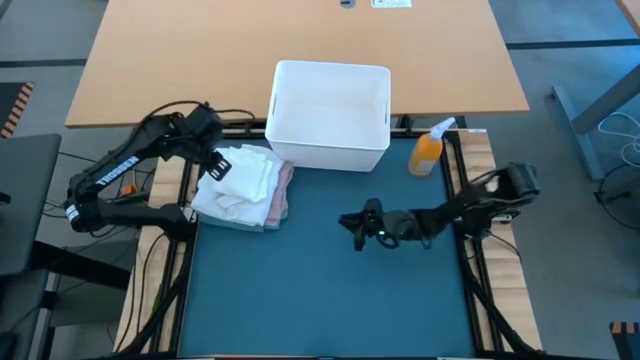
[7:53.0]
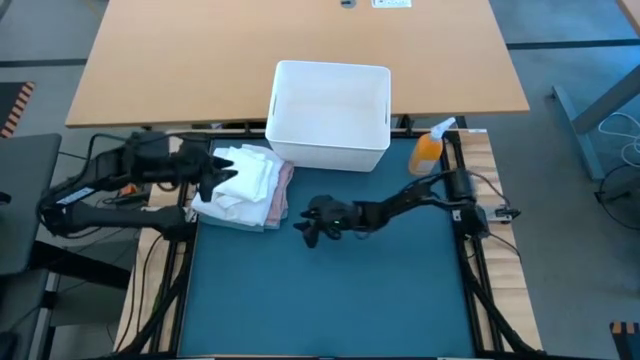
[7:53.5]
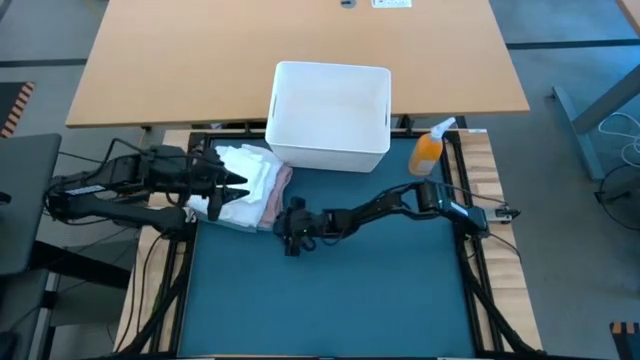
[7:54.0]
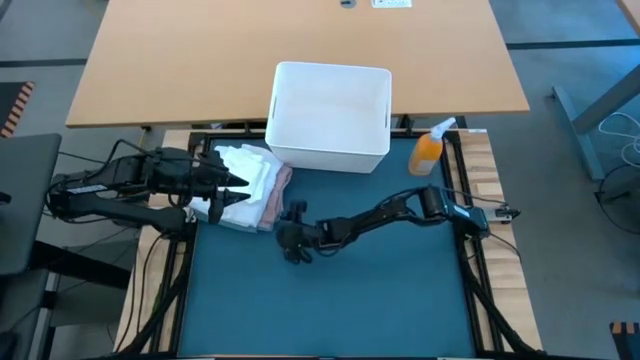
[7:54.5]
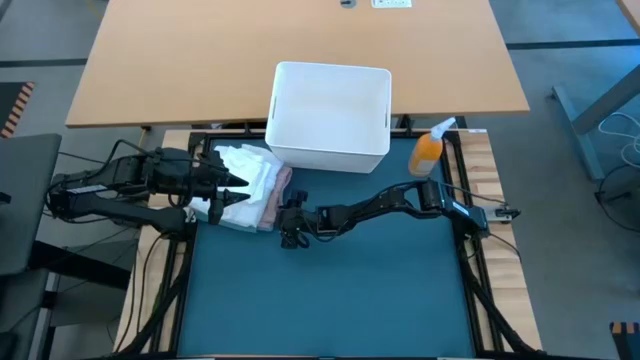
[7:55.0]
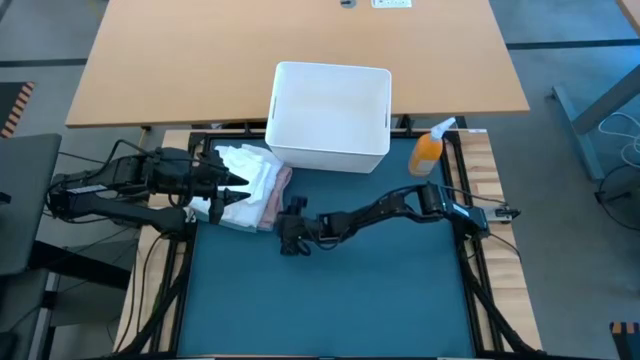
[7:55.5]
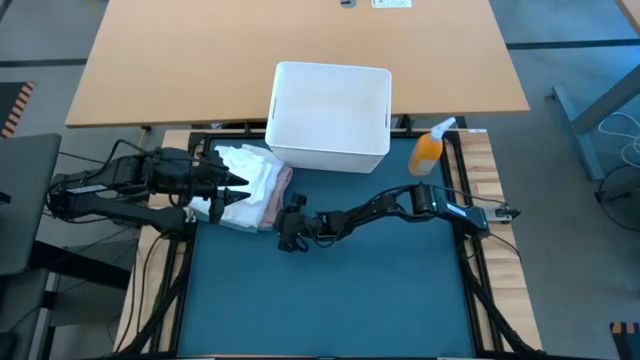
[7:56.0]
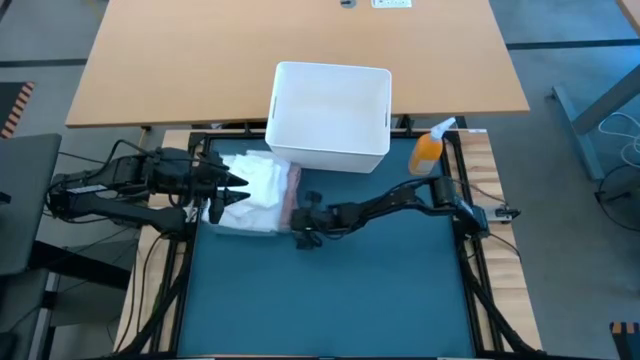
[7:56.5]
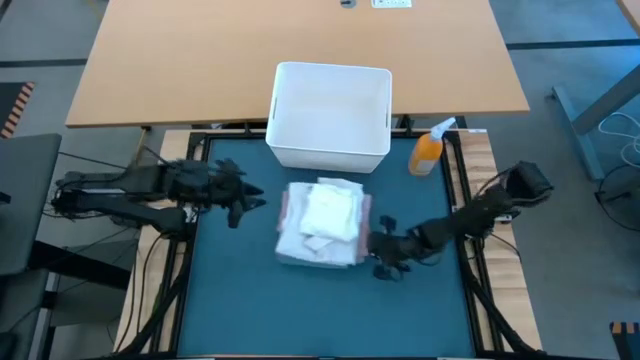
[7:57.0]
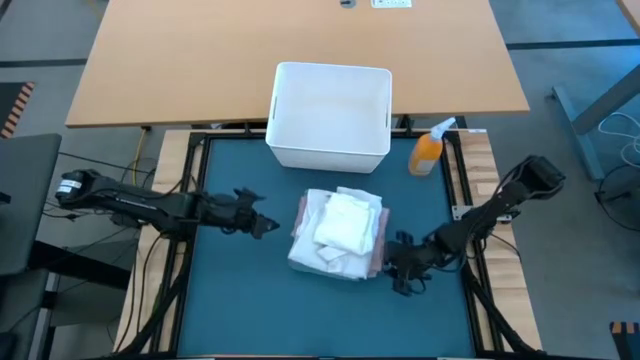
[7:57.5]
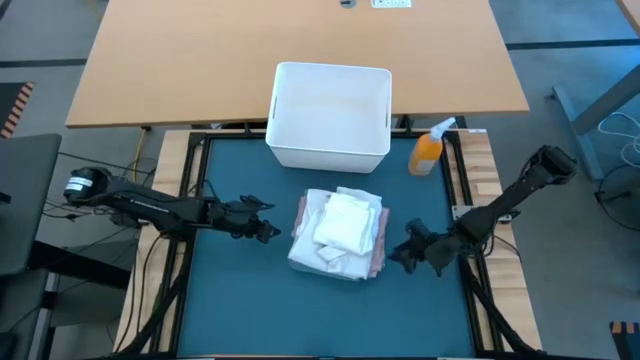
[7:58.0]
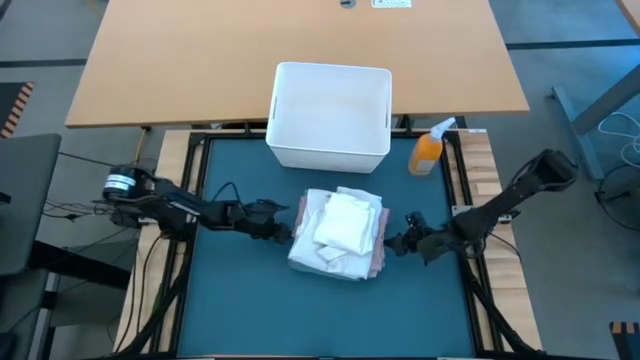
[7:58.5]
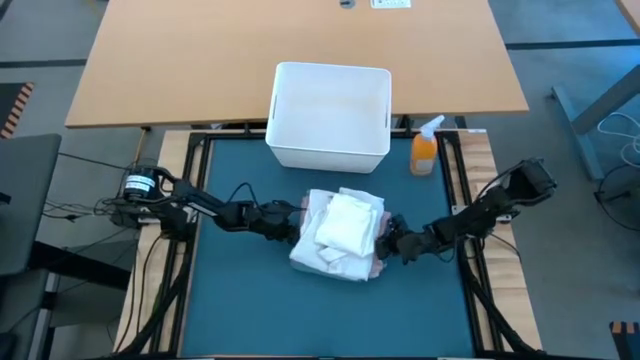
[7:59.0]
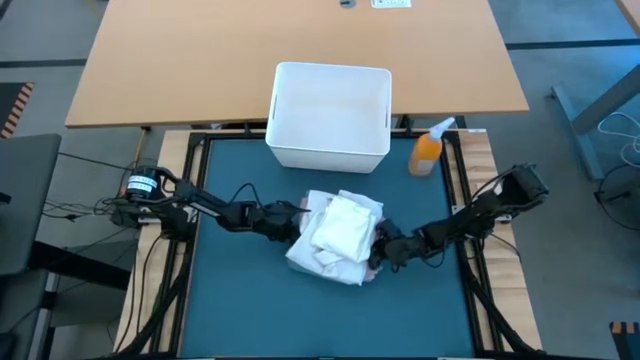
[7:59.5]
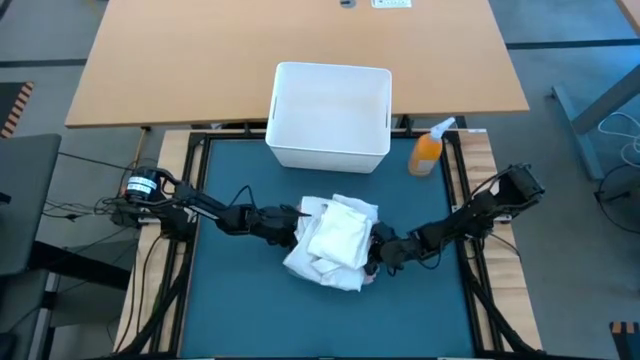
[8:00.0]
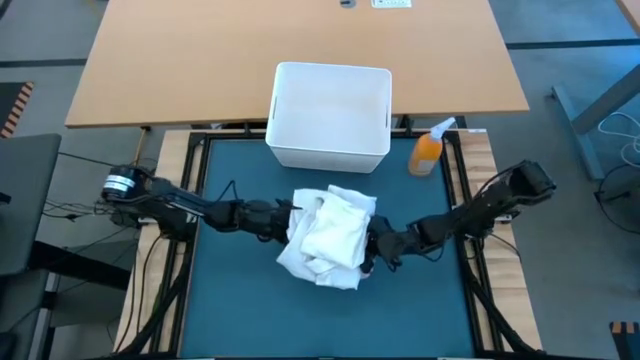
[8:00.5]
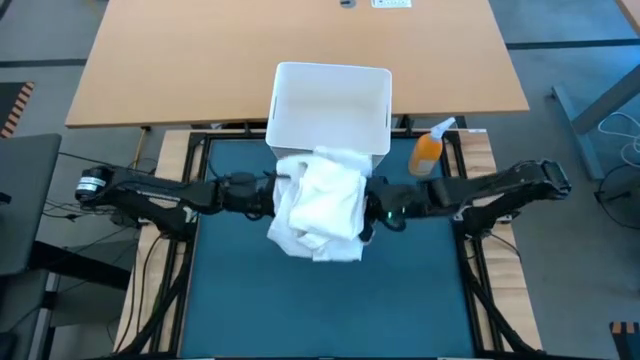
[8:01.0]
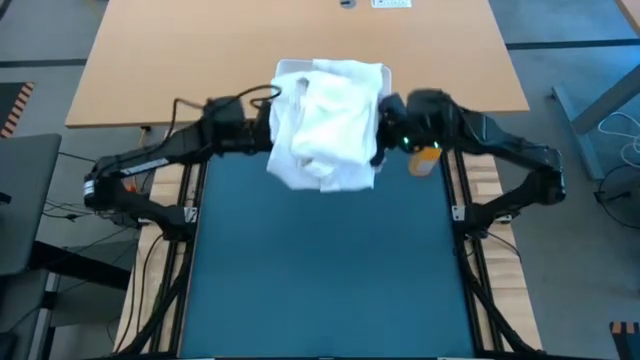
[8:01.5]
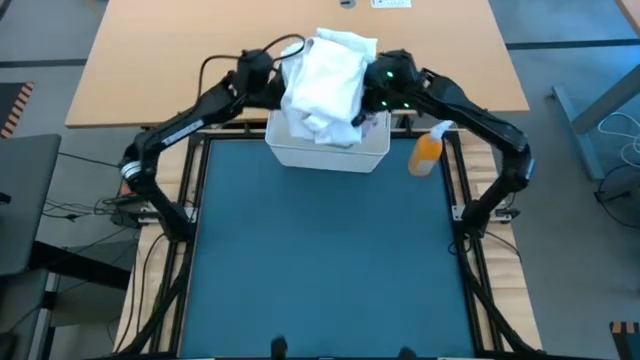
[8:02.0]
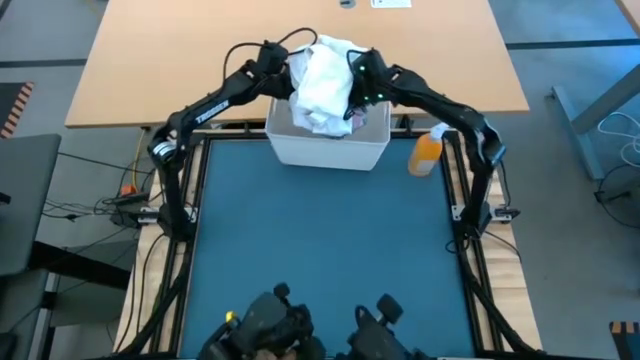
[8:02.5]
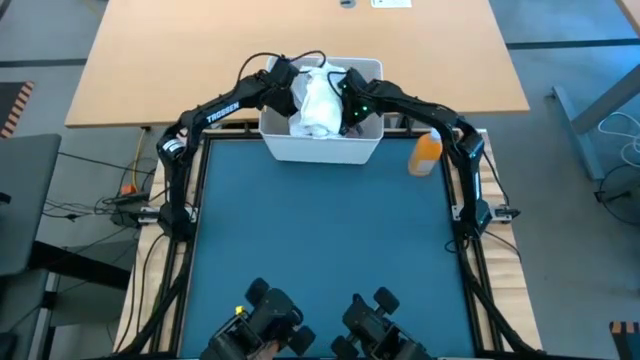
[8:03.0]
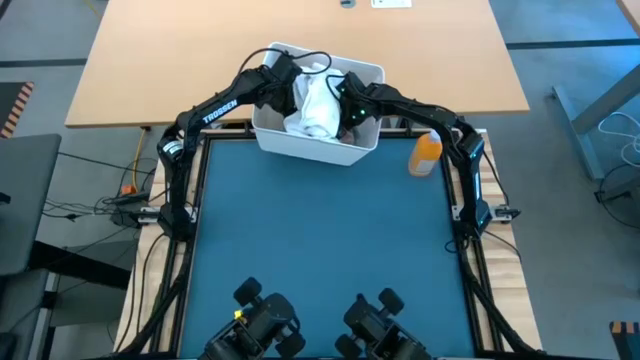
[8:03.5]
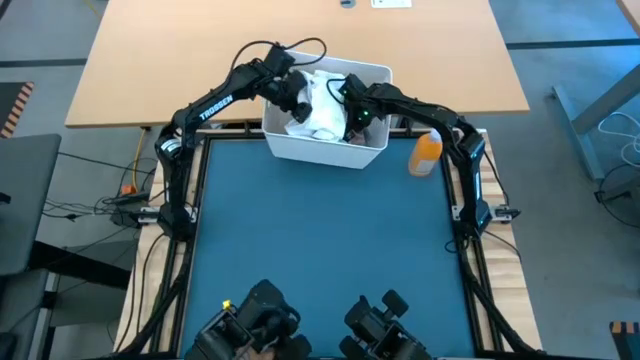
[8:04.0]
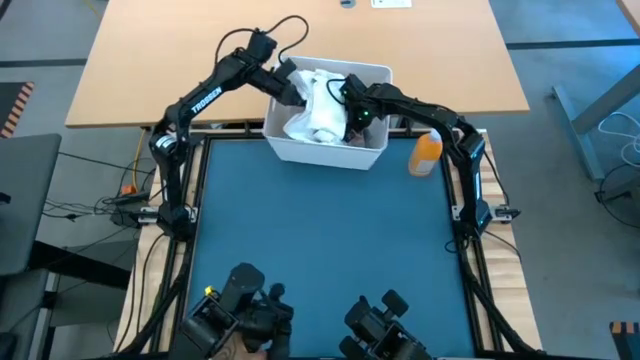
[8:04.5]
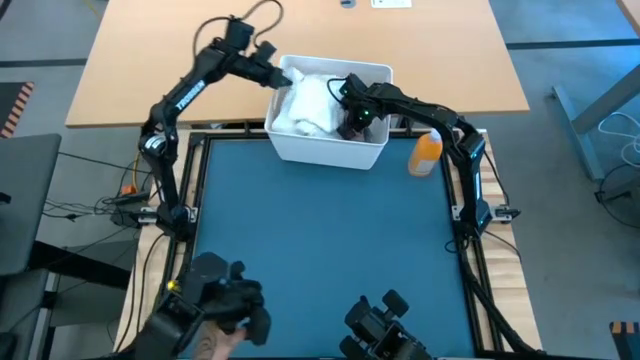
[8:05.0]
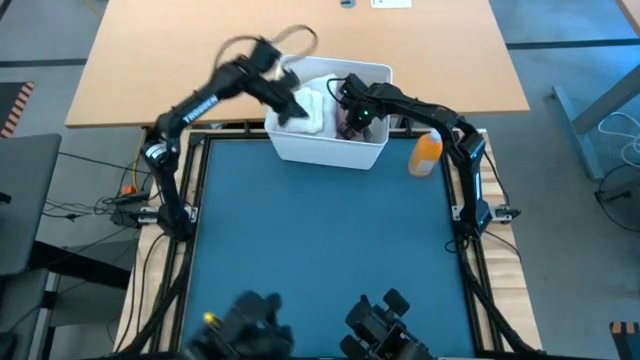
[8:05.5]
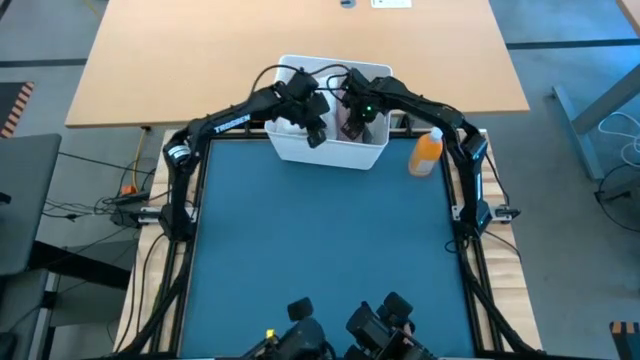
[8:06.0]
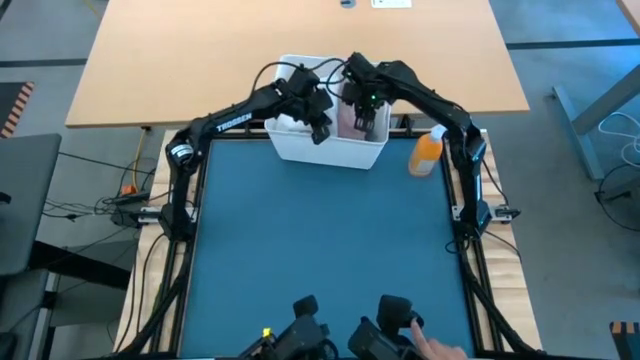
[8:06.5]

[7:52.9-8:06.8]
Task: Fold Laundry from Bin
Put the stacked clothes into the white bin

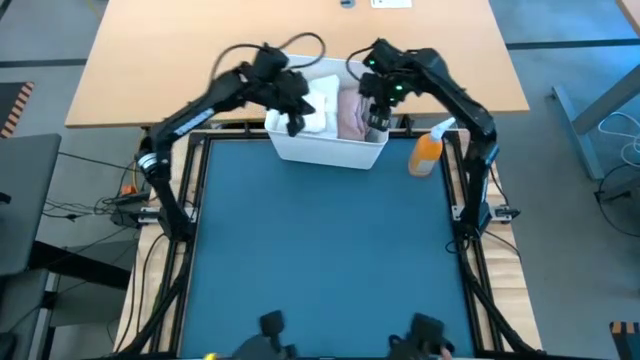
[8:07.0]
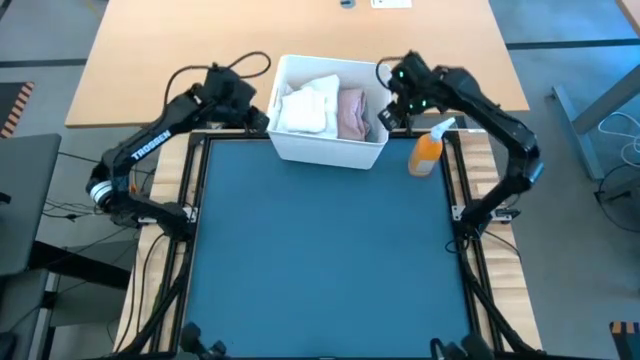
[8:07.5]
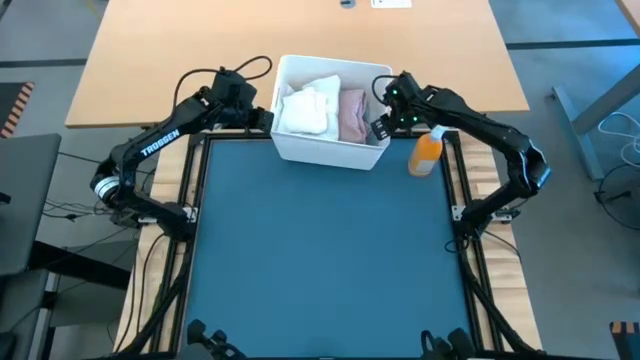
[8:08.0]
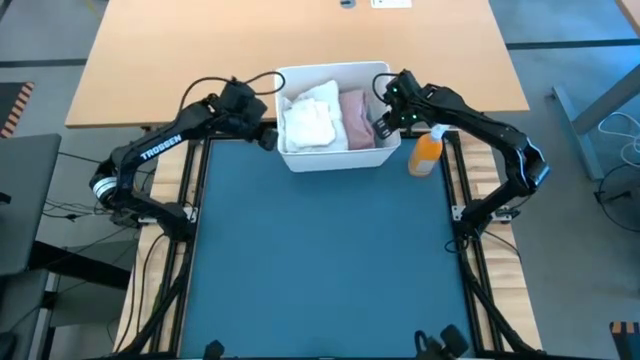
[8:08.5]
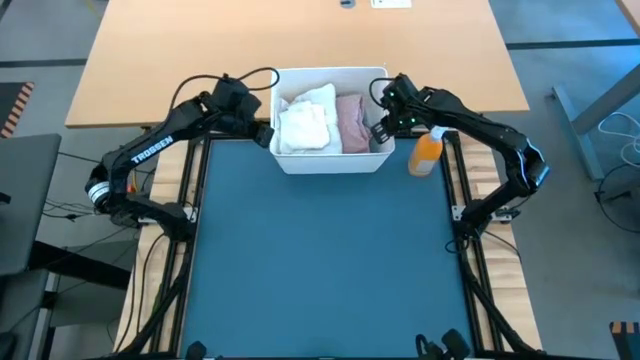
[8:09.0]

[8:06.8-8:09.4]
Adjust the white bin

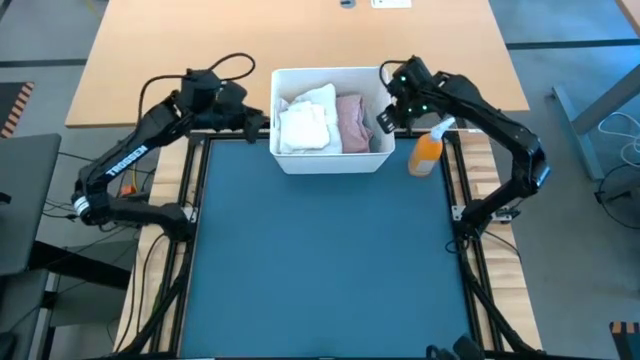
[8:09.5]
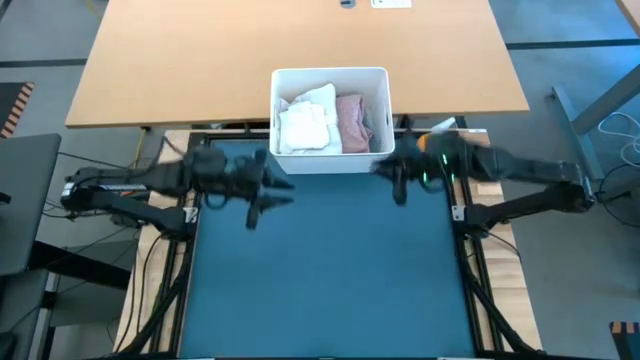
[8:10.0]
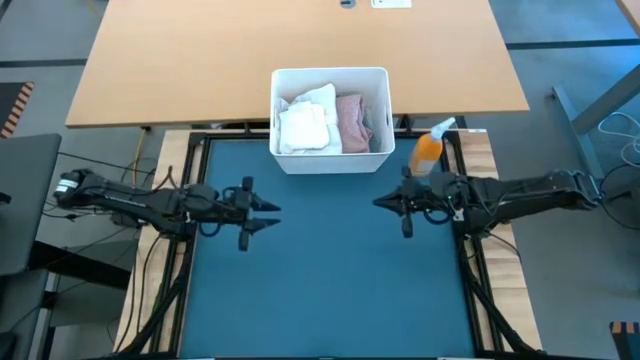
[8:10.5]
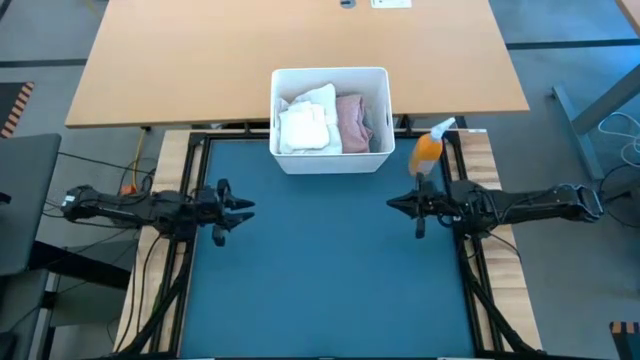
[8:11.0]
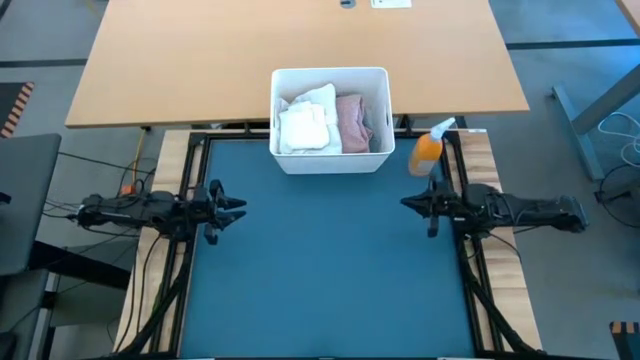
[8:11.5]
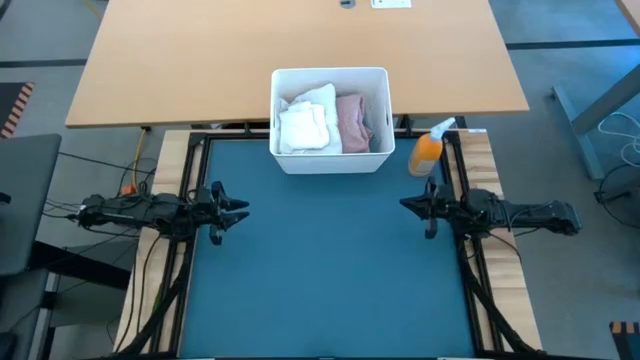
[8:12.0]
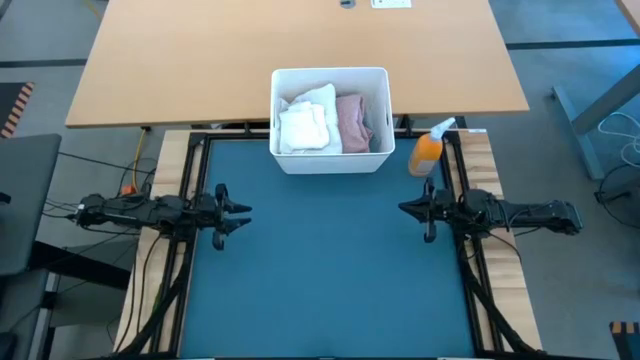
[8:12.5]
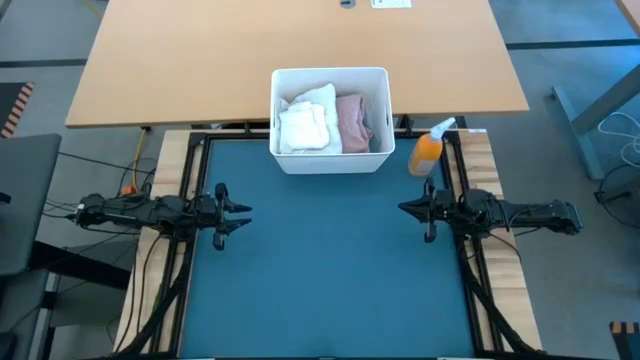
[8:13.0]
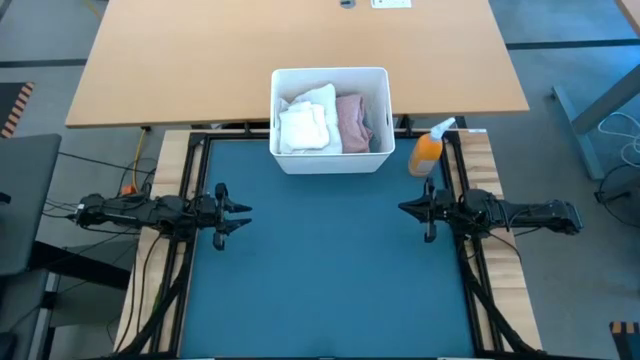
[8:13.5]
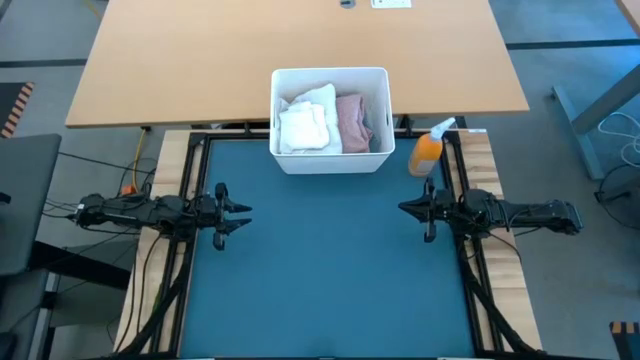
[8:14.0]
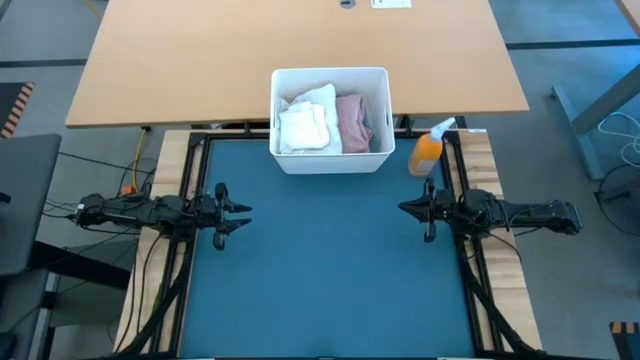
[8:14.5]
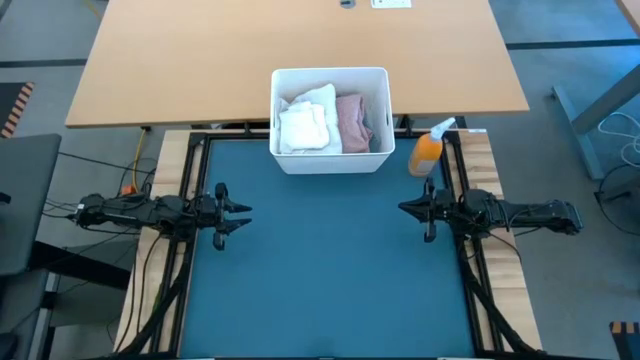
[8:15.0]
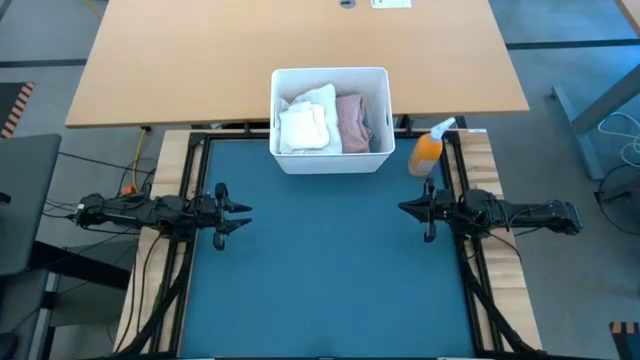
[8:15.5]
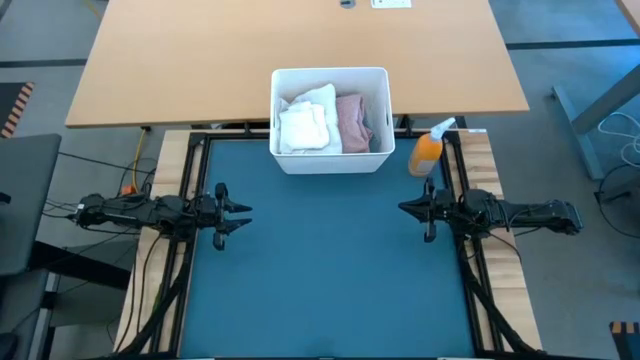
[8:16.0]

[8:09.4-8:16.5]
Return to Home Position
